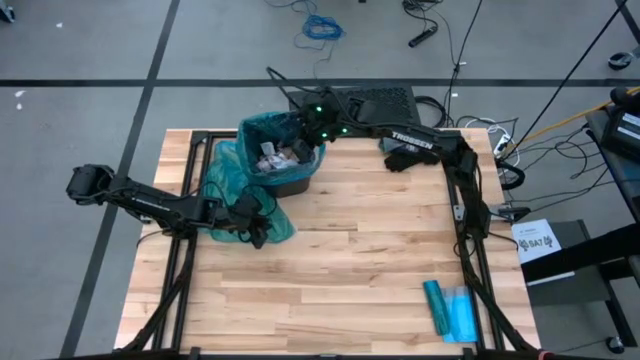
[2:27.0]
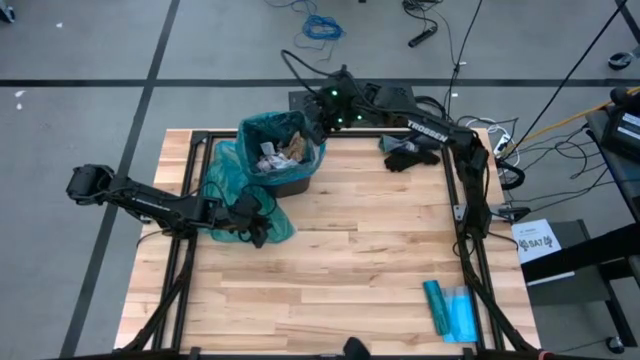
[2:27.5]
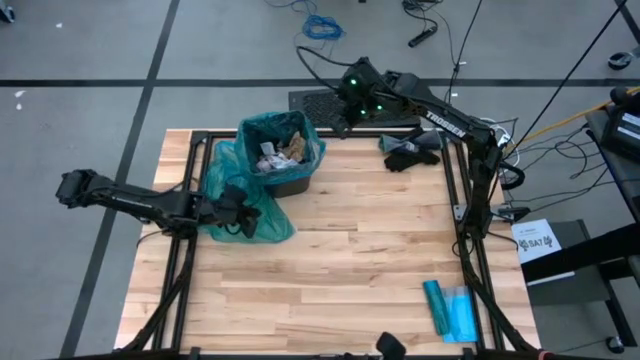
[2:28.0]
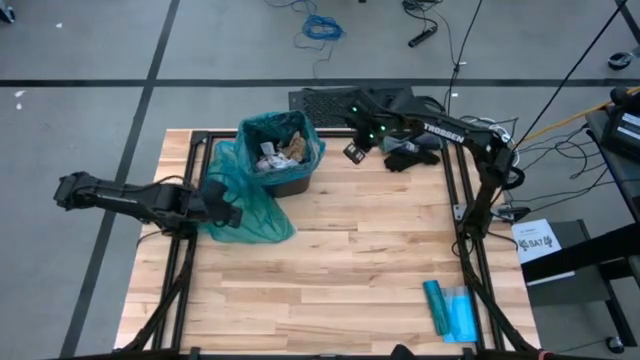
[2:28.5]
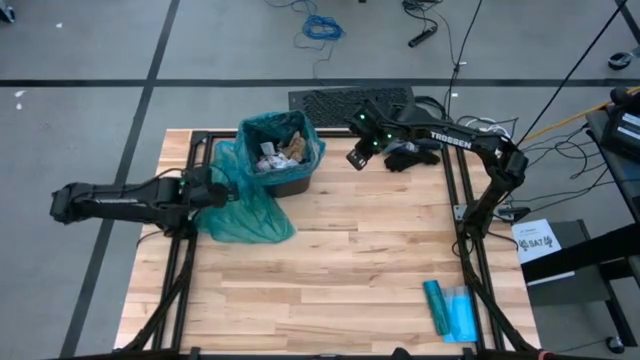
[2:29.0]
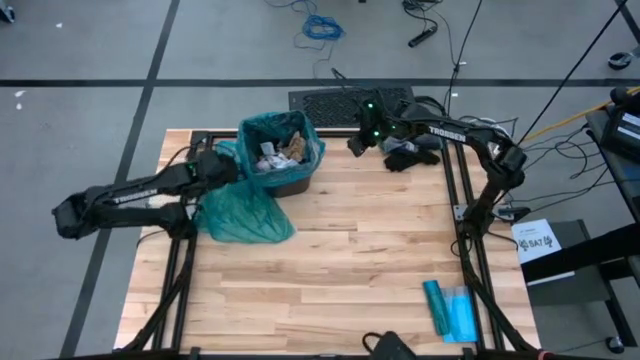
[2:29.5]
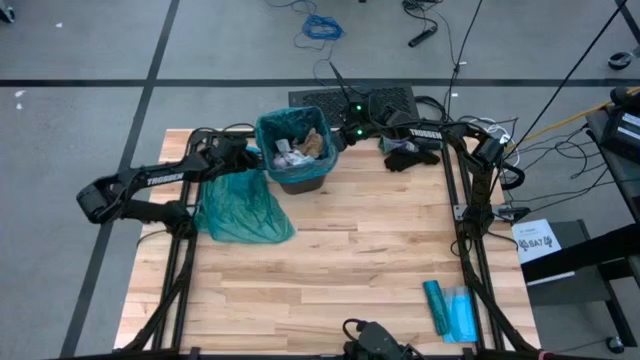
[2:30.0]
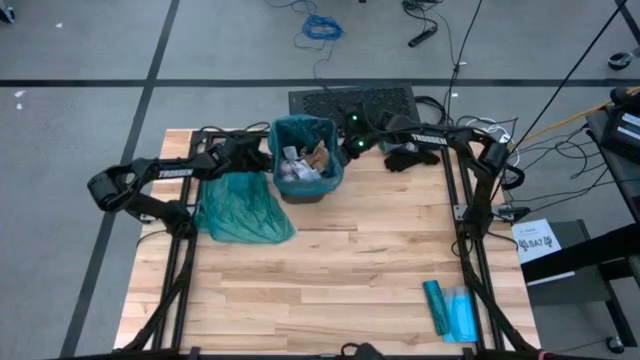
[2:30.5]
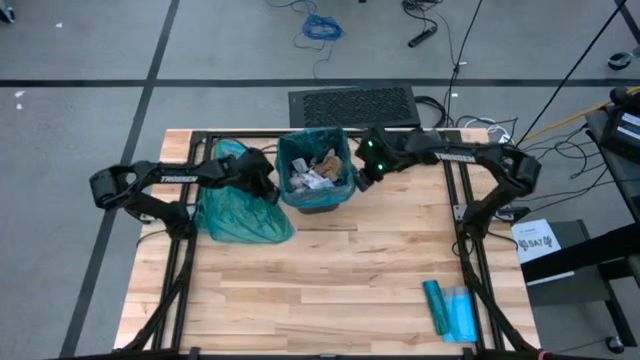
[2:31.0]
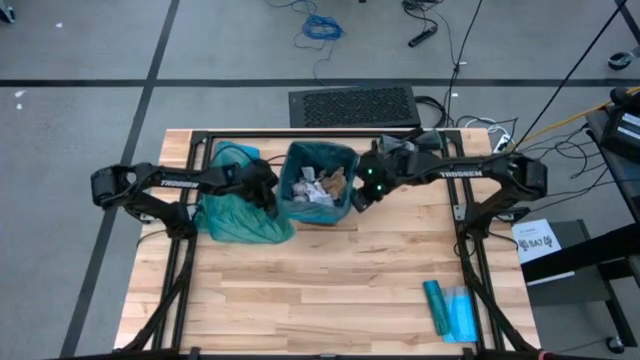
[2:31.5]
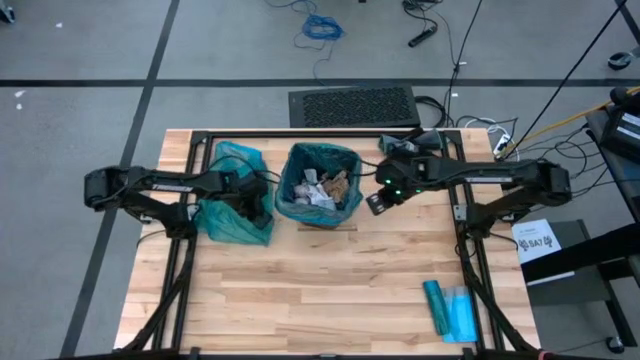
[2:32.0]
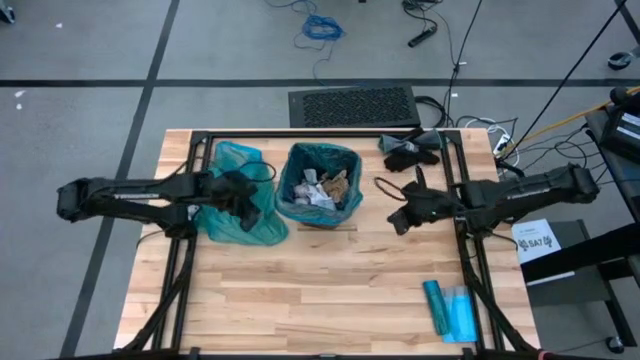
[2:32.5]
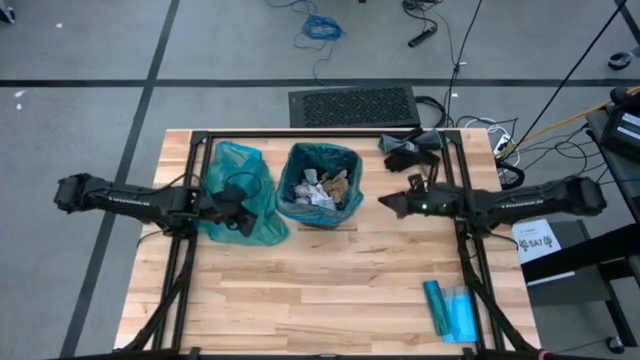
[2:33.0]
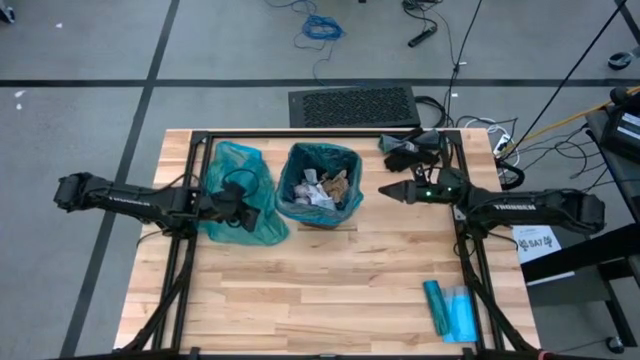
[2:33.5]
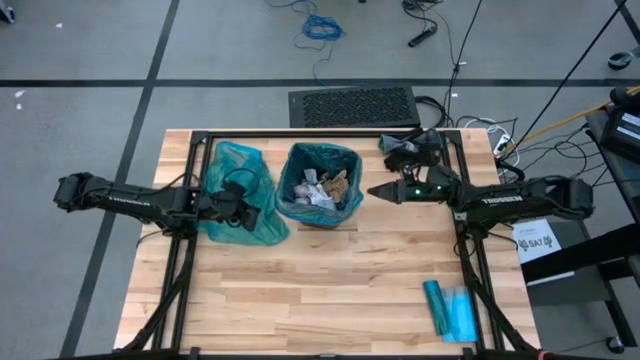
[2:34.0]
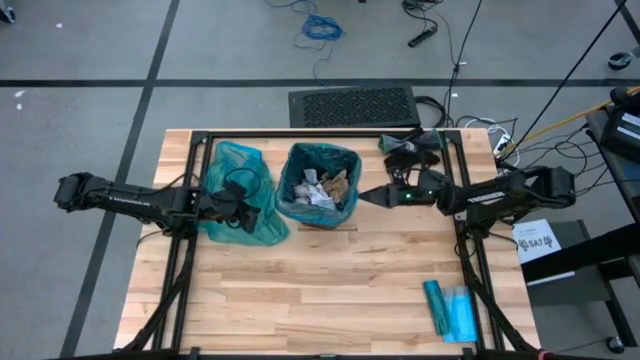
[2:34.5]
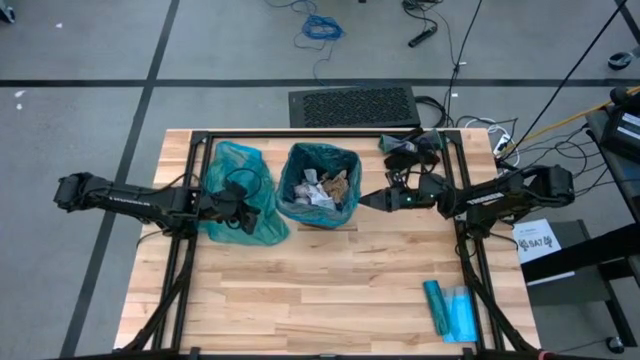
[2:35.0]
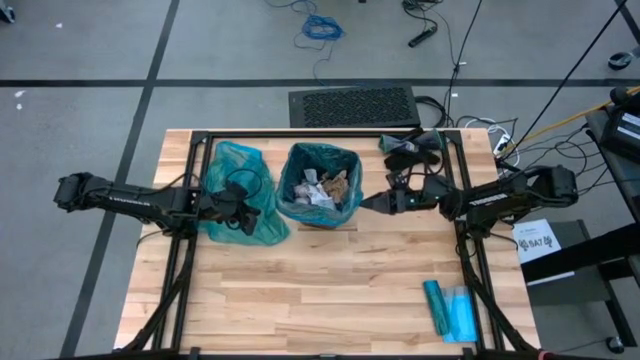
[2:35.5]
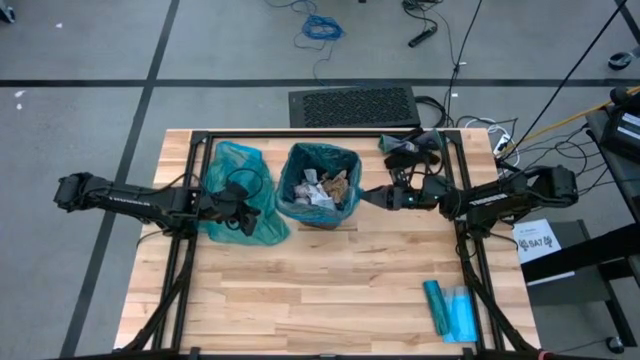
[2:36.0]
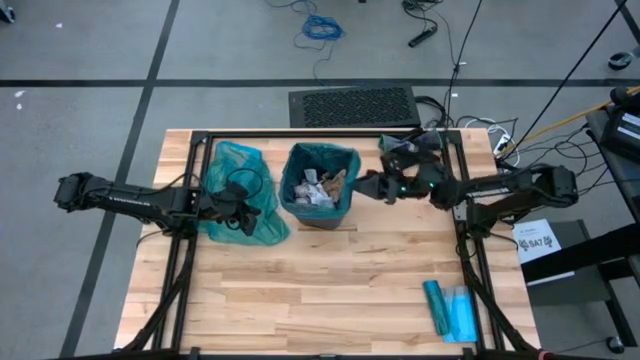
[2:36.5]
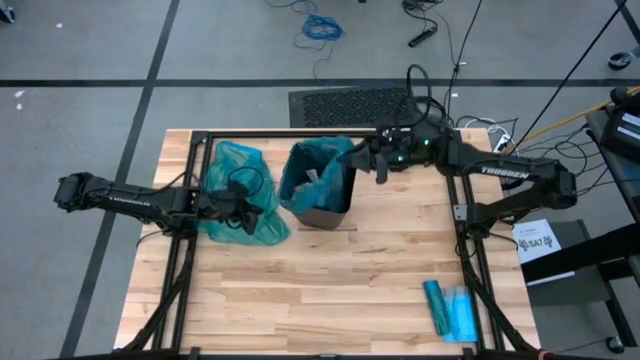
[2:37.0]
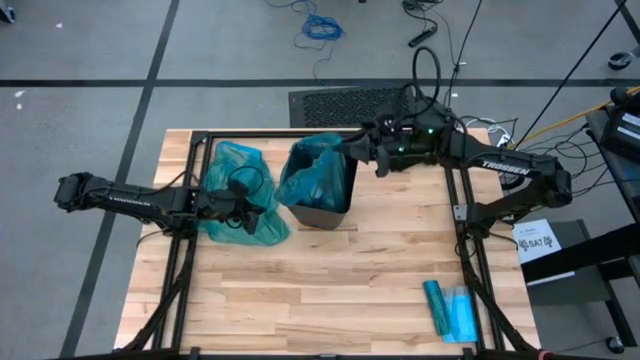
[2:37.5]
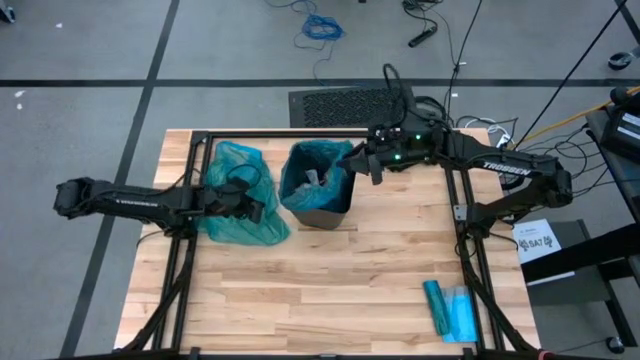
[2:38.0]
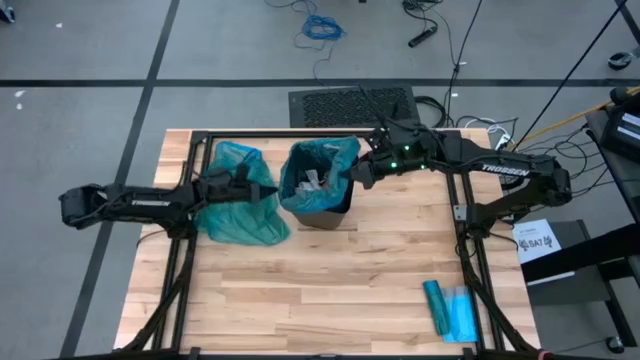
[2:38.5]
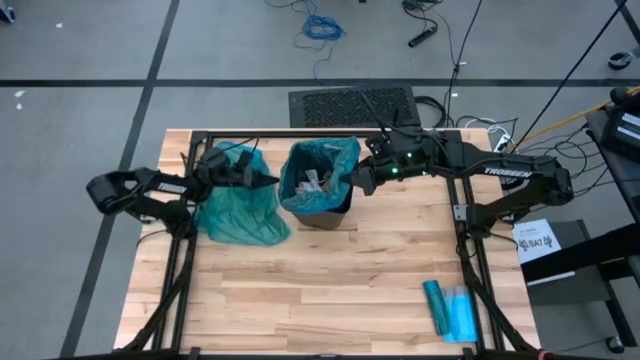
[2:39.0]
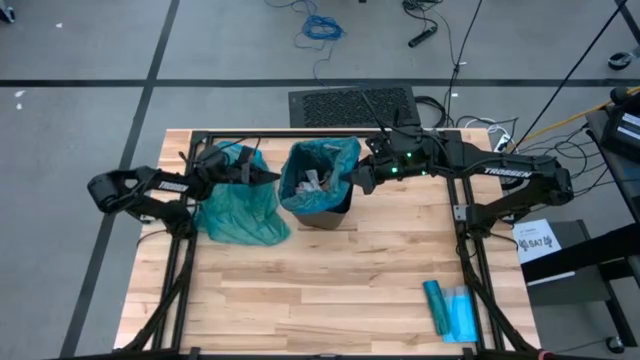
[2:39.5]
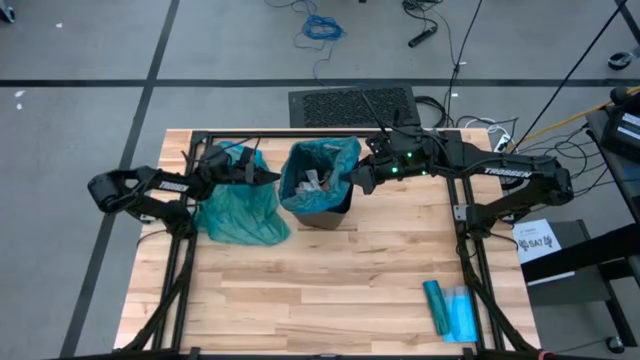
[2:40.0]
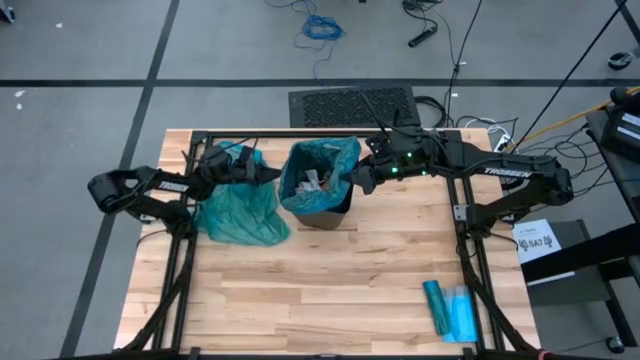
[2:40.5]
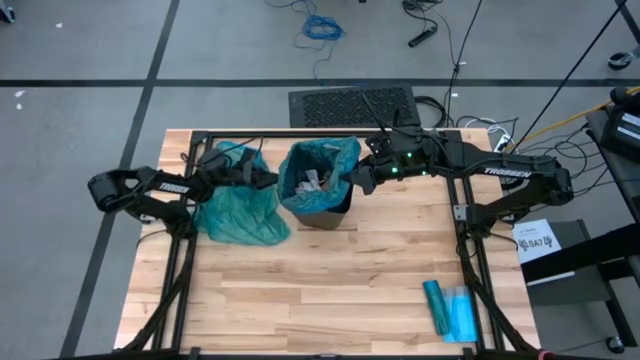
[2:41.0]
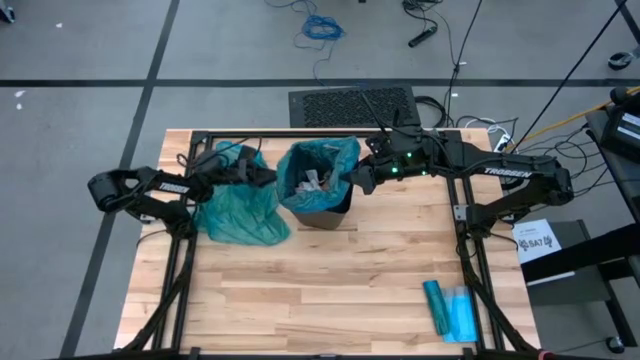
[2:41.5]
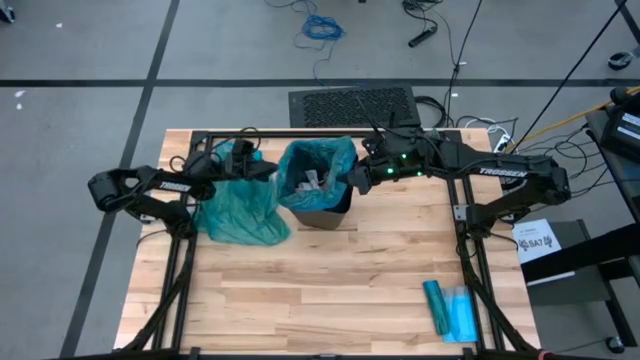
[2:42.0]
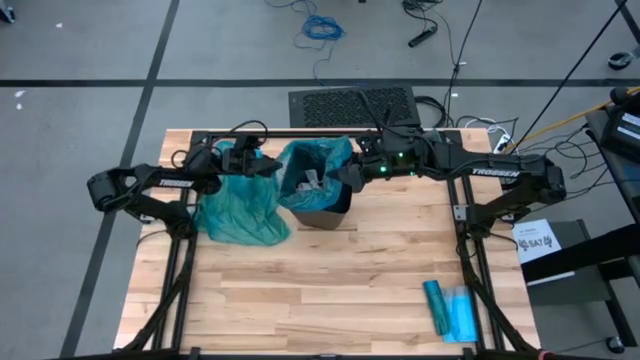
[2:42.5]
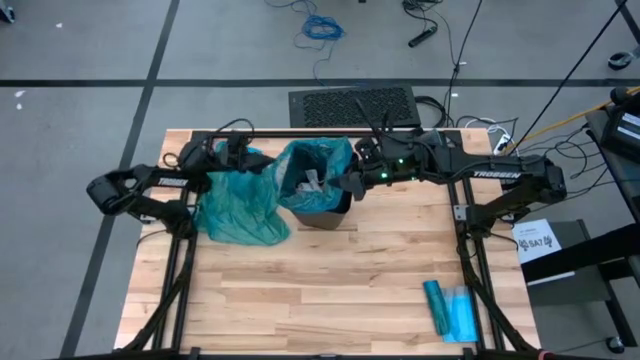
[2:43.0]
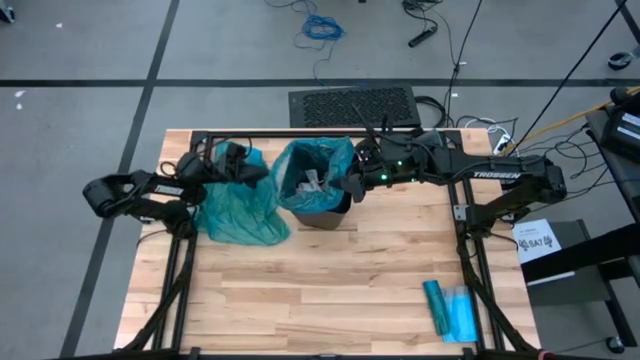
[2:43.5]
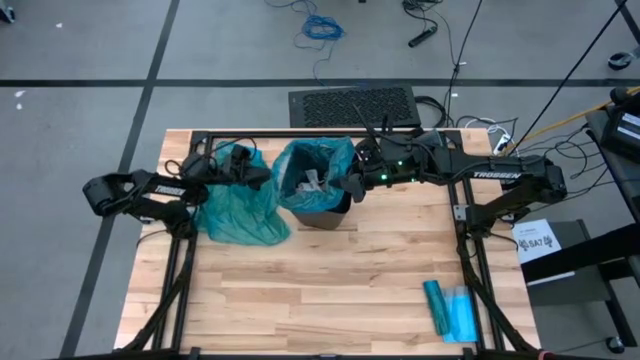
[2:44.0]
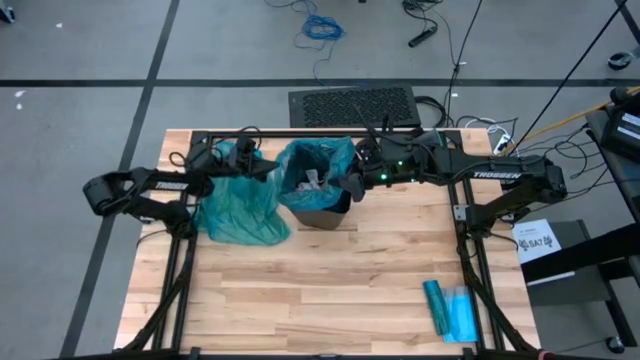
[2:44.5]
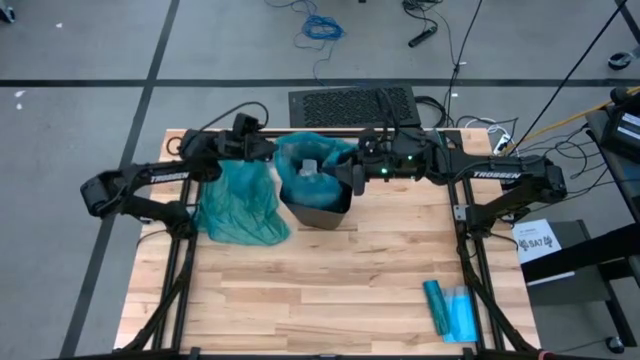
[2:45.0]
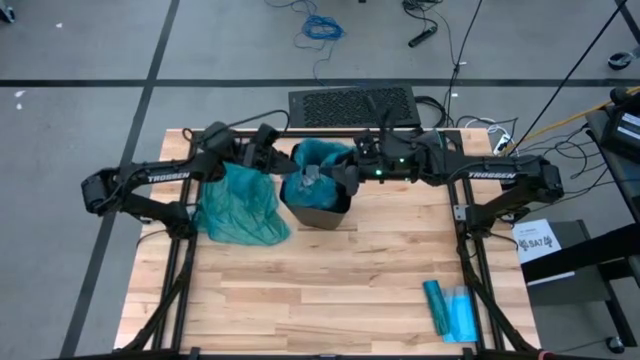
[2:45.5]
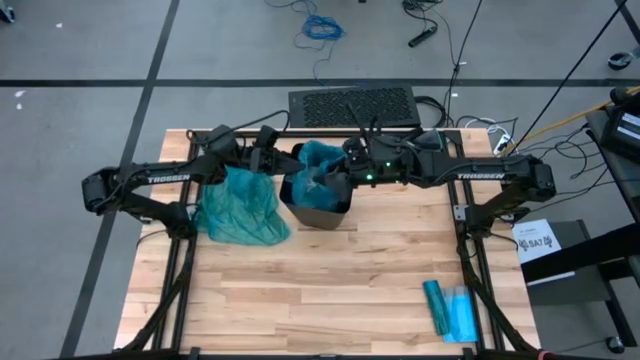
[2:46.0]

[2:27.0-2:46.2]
Task: place trash/remove bag and relplace
Remove the trash bag from the trash bin

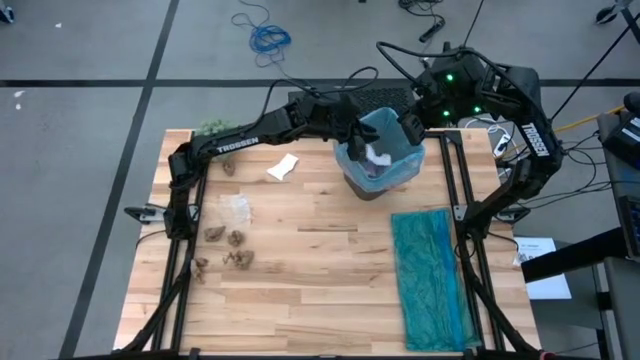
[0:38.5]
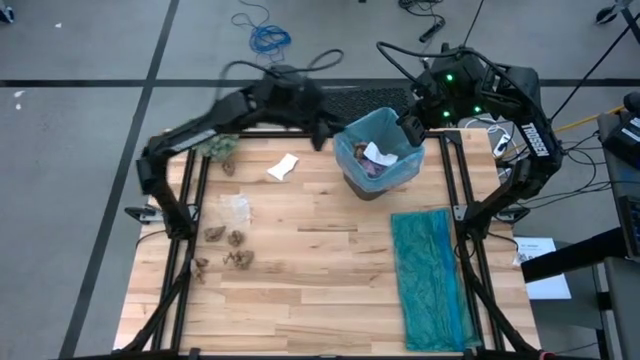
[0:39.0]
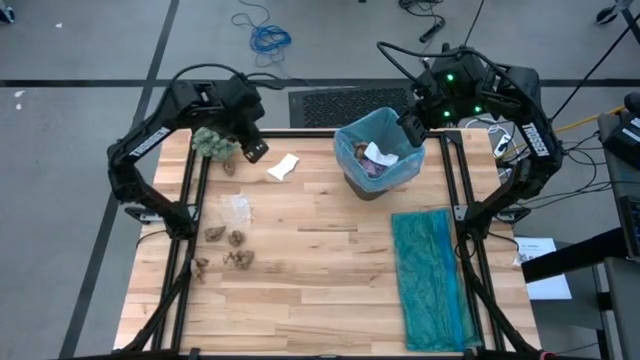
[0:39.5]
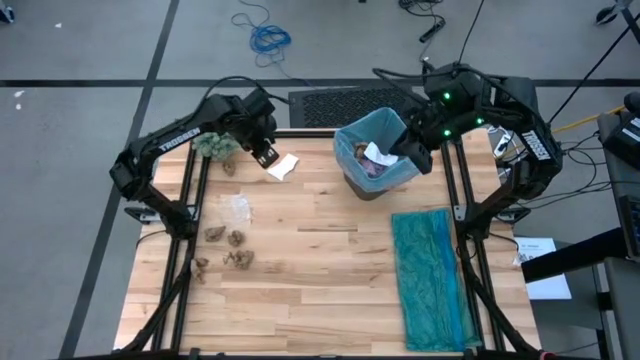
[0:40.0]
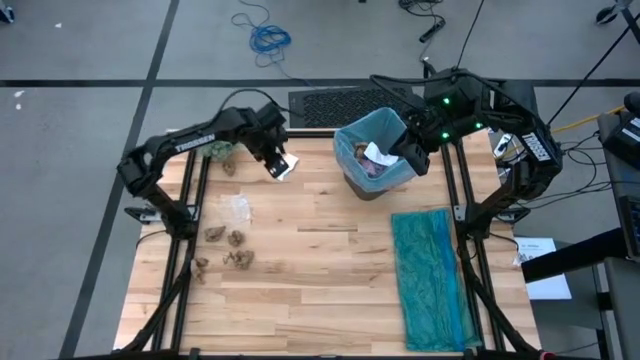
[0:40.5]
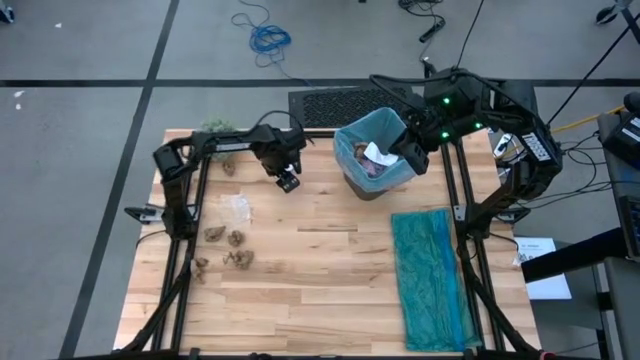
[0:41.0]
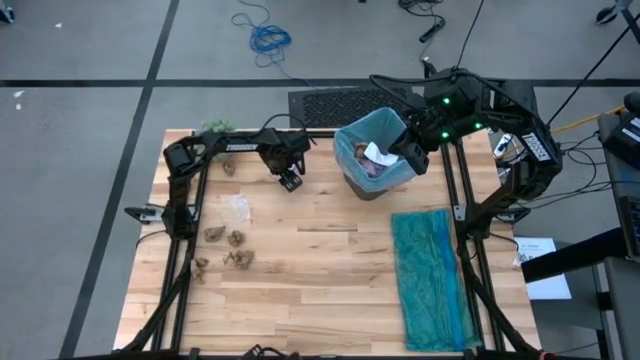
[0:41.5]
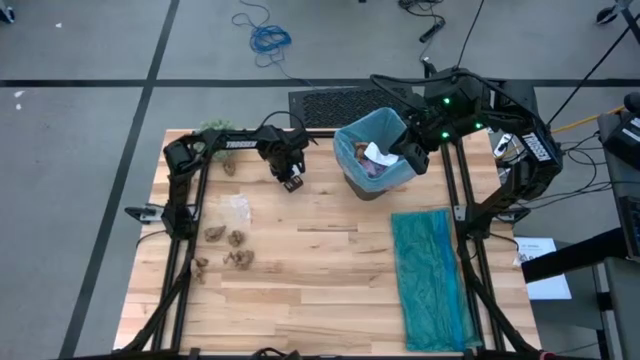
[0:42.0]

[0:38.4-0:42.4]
Task: place trash/remove bag and relplace
Put the white paper into the trash bin
